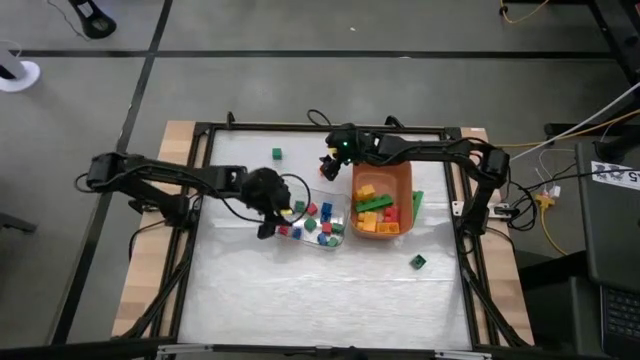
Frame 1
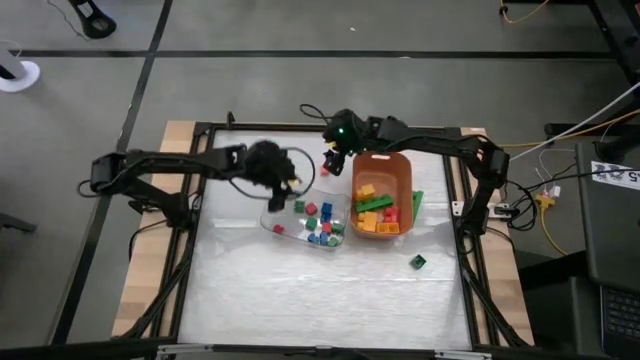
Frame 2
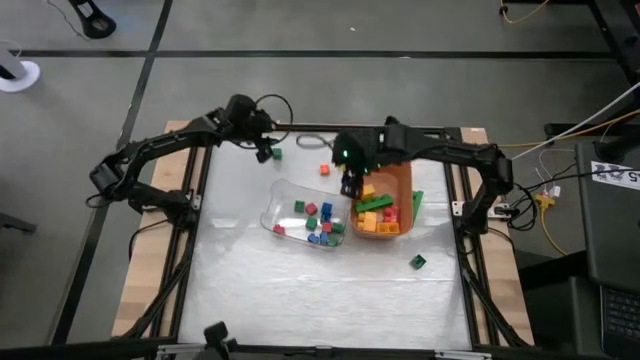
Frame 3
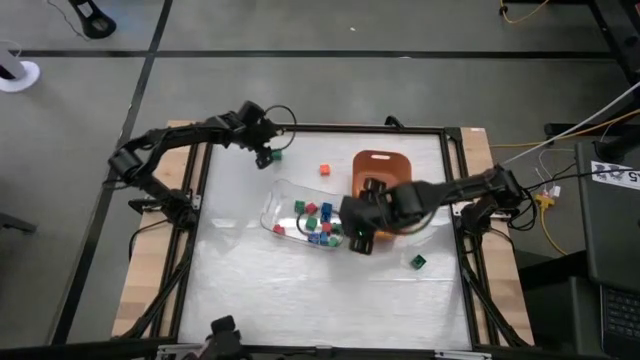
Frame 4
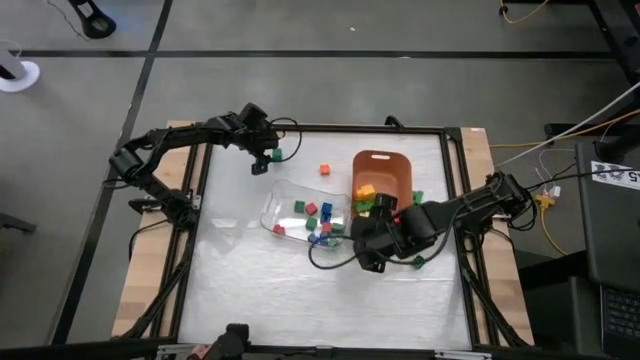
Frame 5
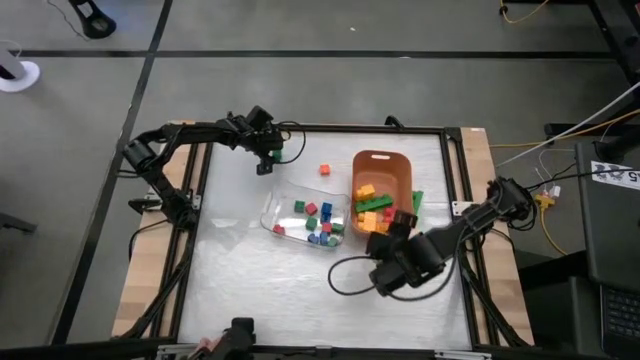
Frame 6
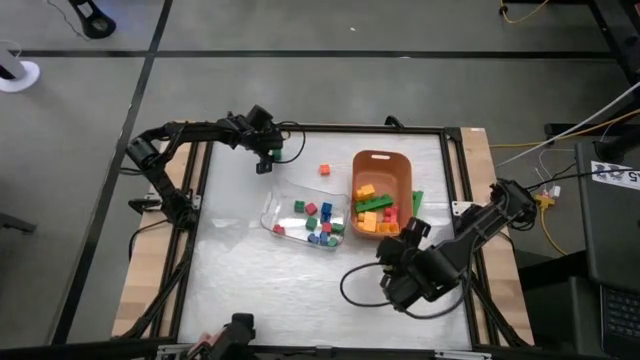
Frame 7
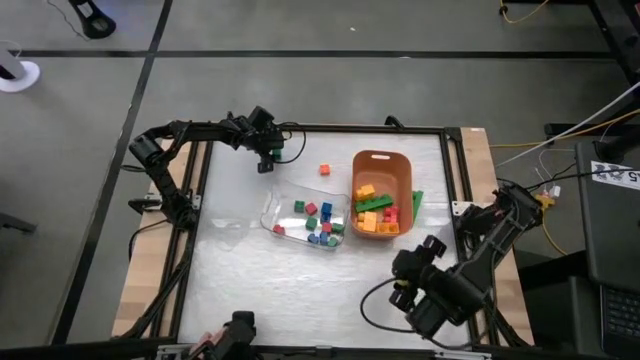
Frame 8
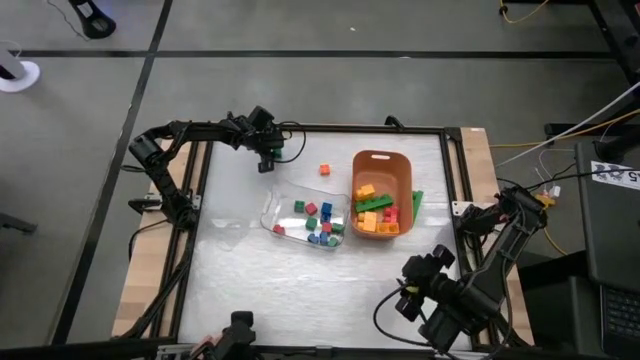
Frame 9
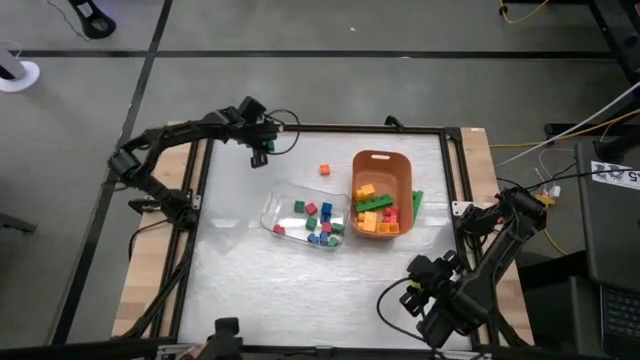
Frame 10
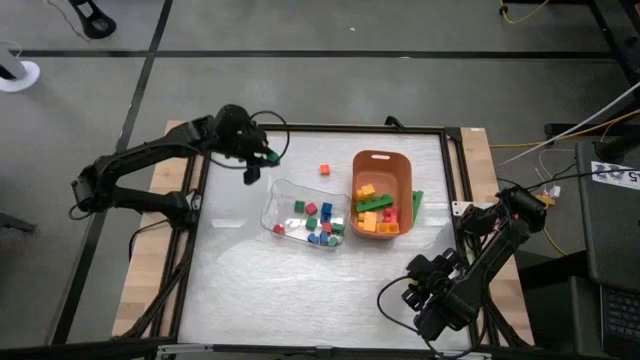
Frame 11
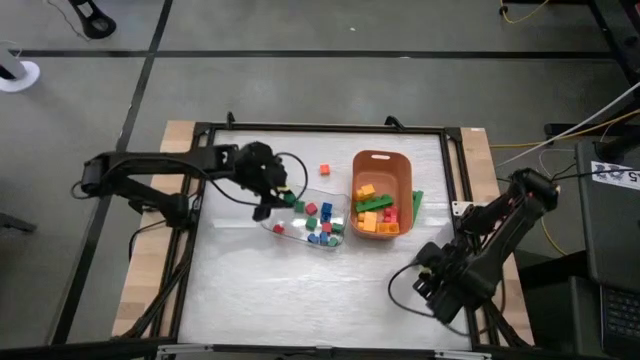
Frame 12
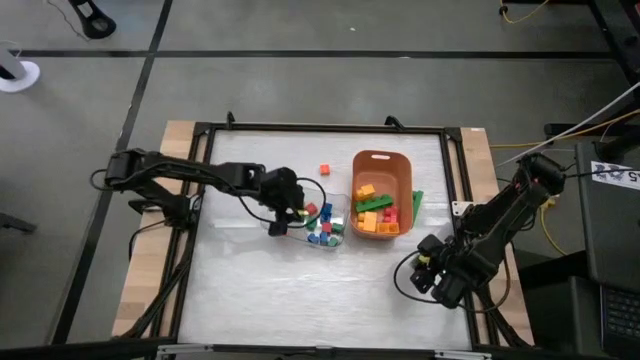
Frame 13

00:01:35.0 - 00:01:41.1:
Task: Sort blocks by size
Put the small green block into the transparent bin

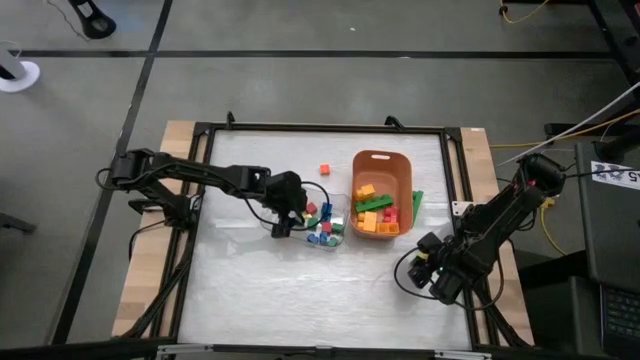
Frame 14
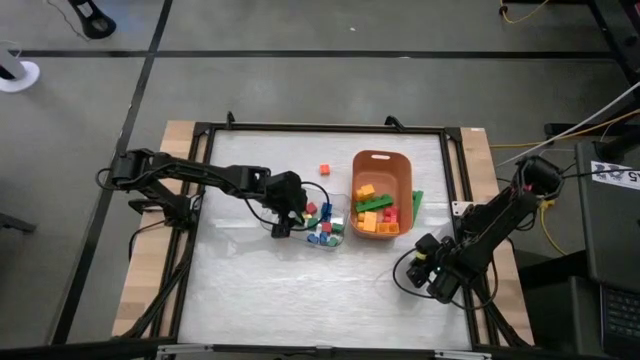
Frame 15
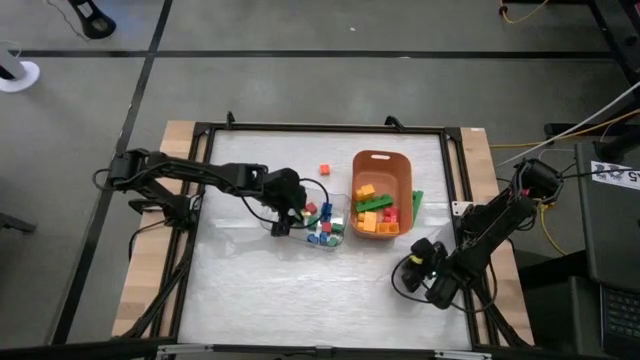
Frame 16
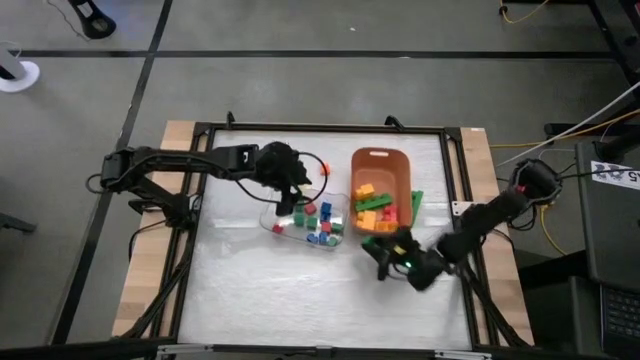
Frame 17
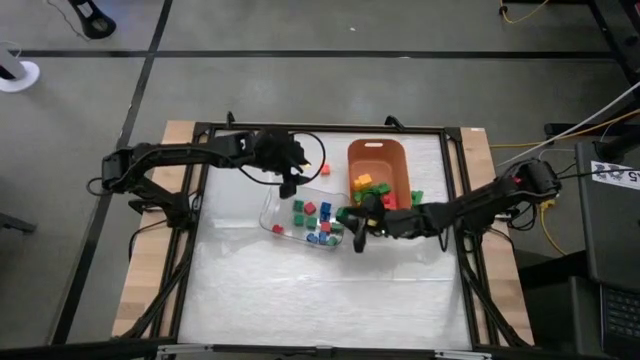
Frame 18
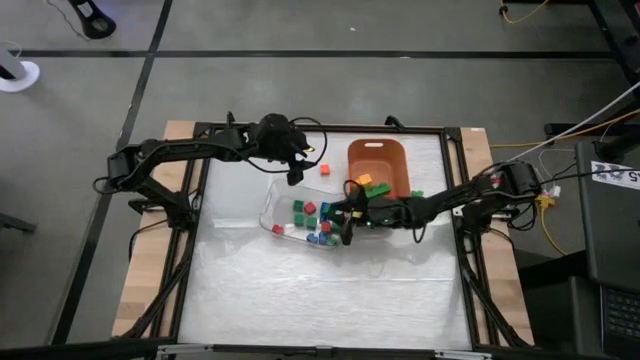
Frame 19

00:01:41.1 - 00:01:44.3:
Put the small green game piece into the transparent bin

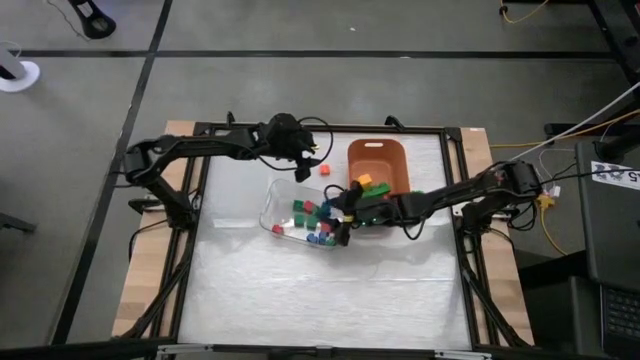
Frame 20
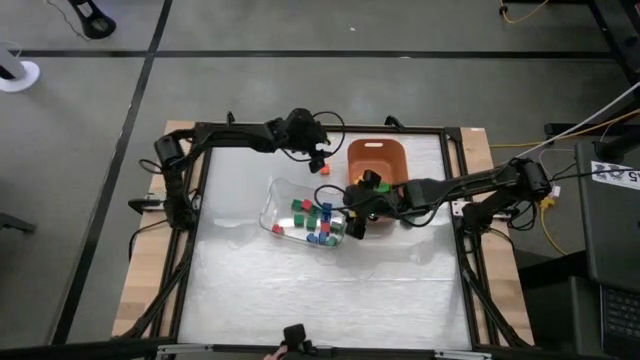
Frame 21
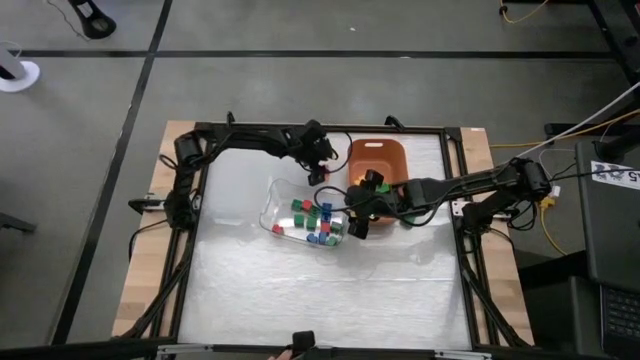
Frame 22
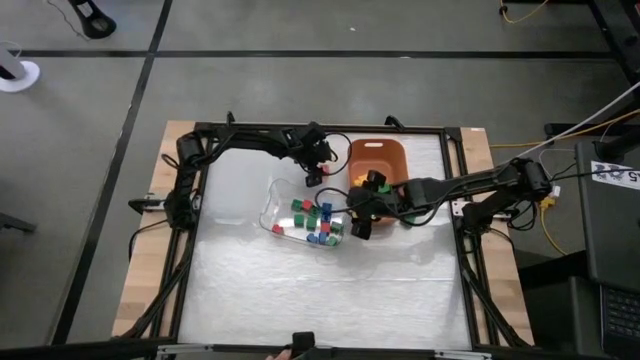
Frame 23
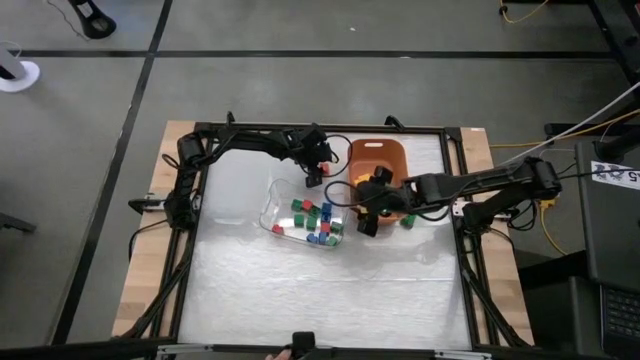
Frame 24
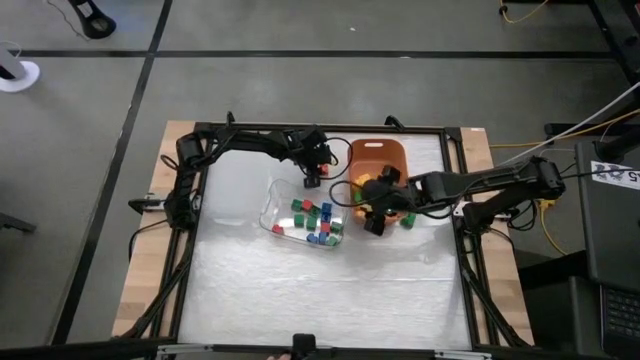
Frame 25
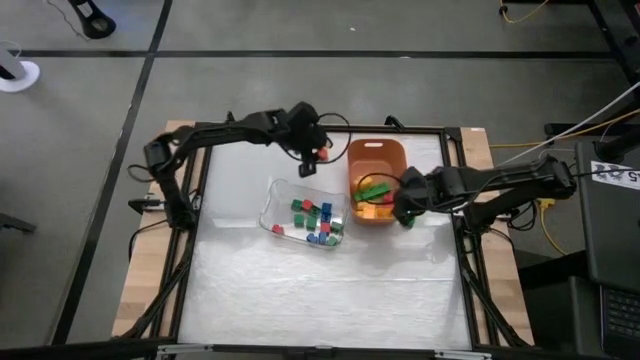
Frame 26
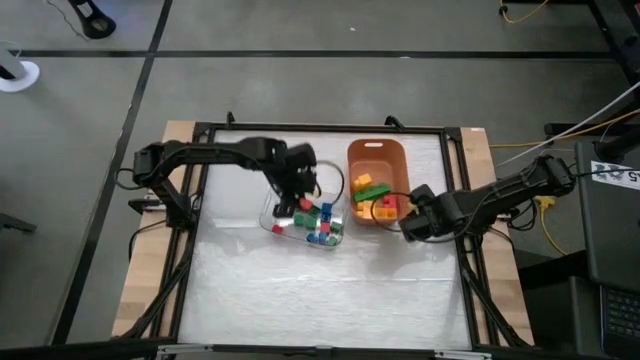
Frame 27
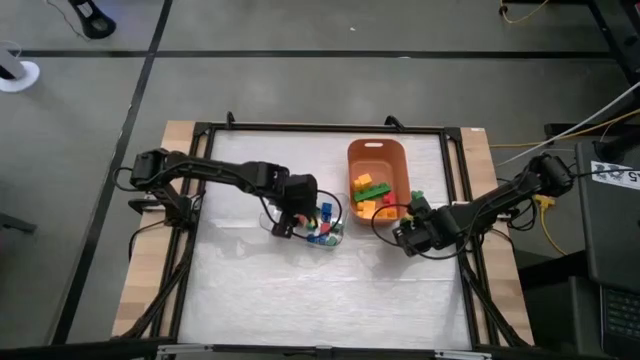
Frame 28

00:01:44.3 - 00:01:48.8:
Put the small orange game piece into the transparent bin

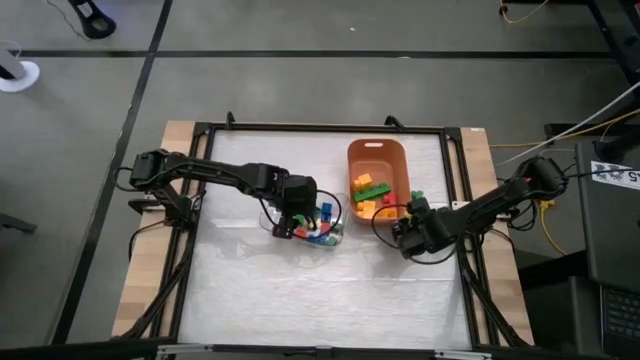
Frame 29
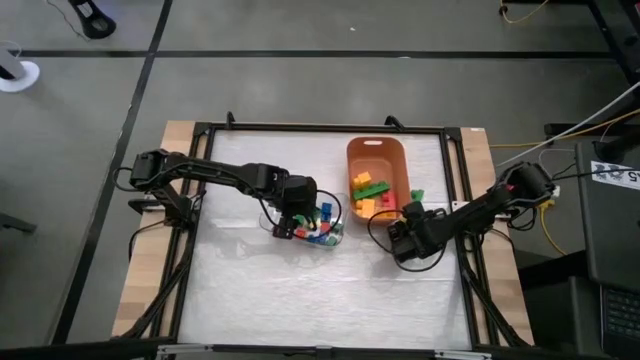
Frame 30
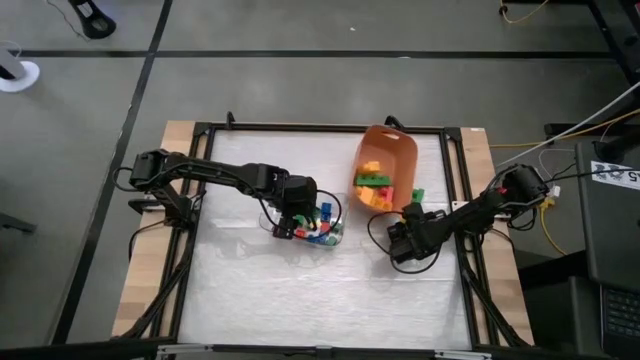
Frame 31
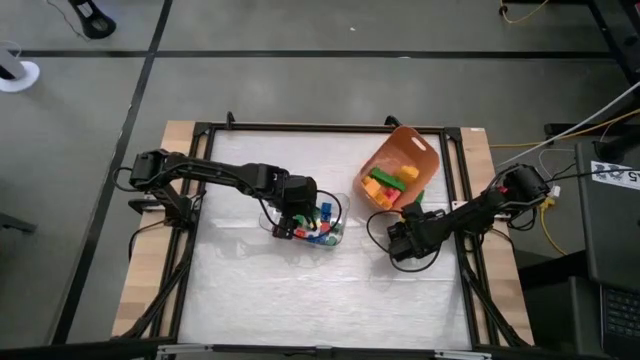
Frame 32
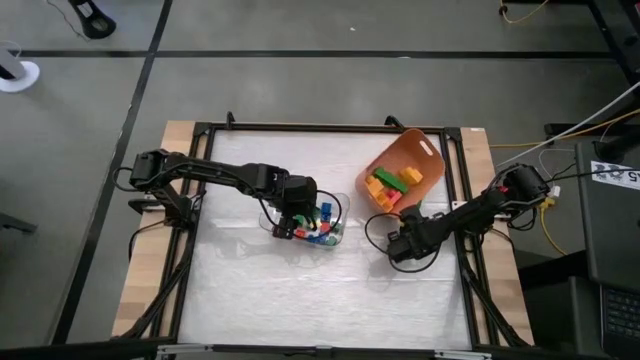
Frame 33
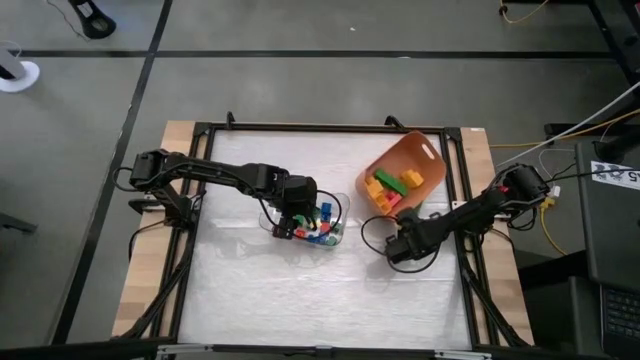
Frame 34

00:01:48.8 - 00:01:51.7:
Put the big green game piece into the orange bin

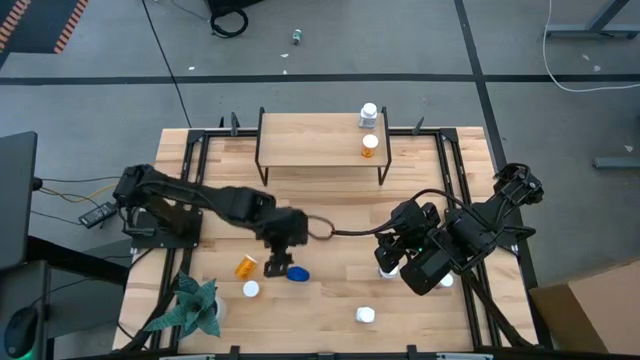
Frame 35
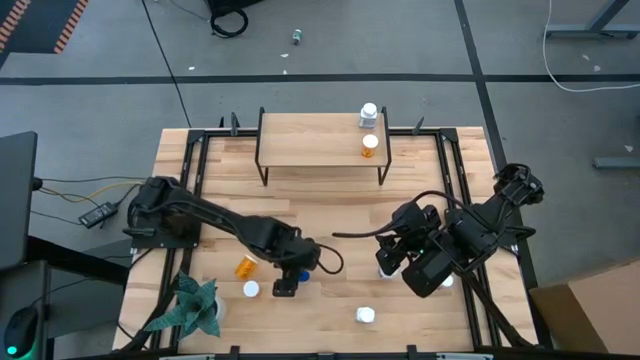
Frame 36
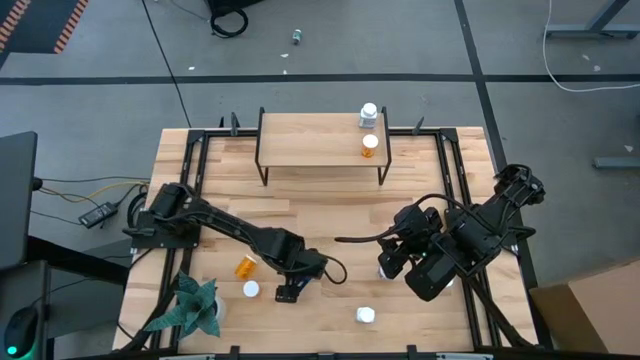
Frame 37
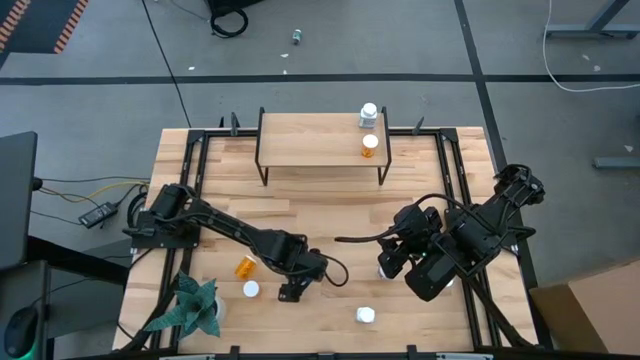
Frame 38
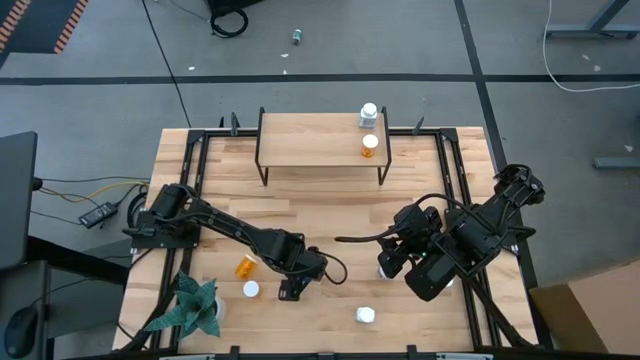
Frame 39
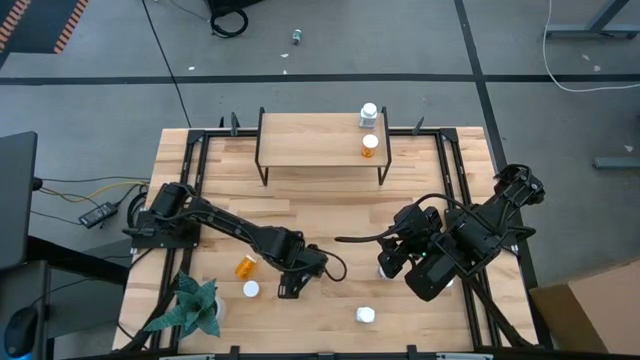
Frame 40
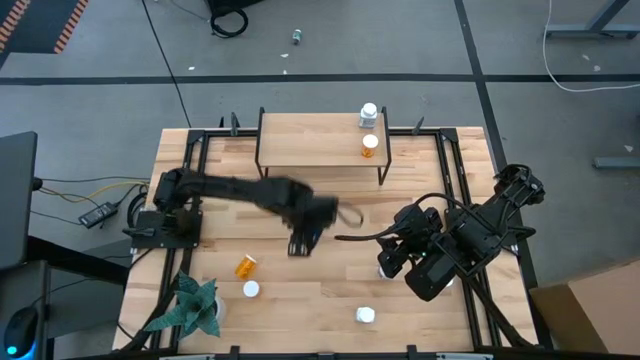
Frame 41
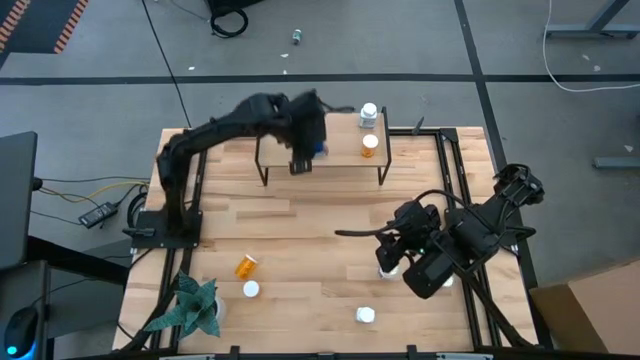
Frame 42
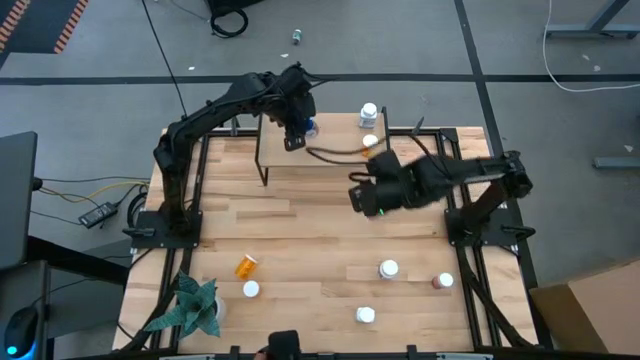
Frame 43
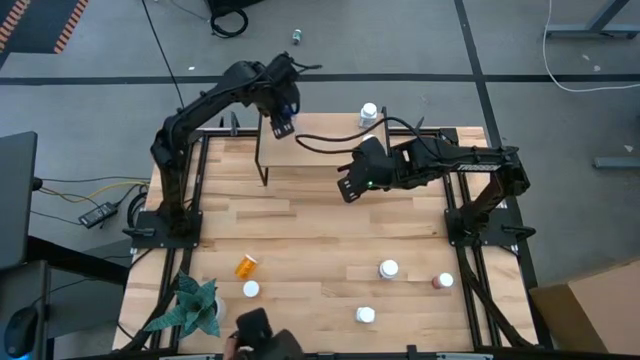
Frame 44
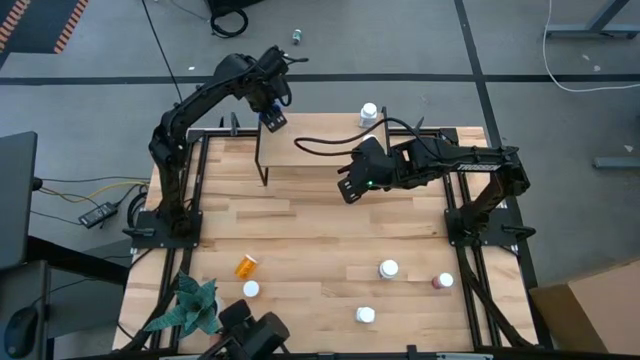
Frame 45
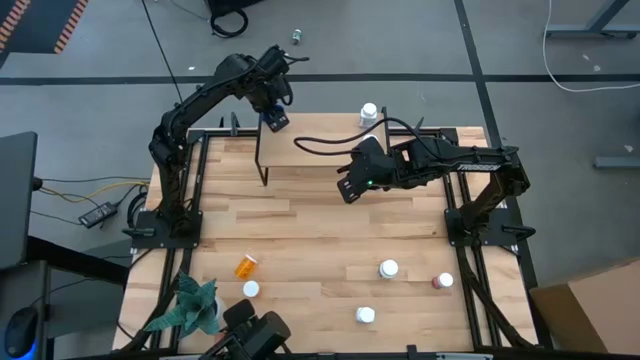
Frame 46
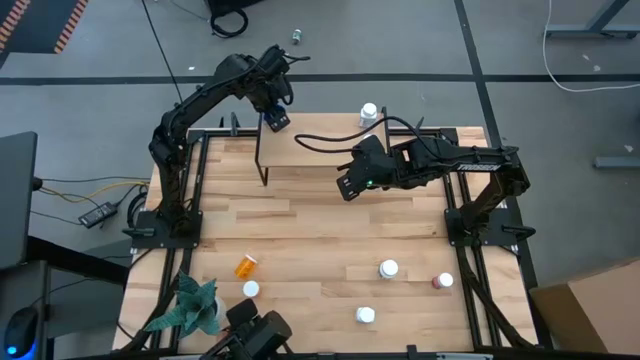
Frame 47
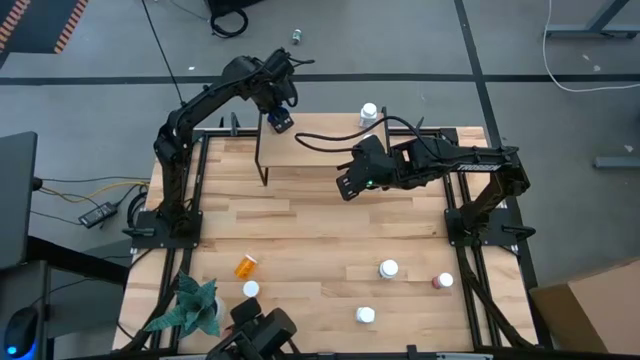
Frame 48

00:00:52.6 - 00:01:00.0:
Task: Pick and place medicine bottles onto shelf by color
Put the transparent pill bottle on the shelf
